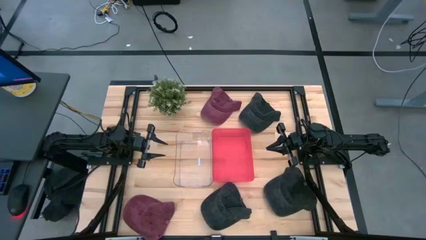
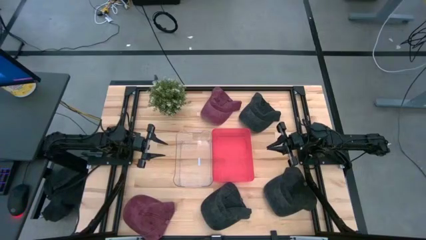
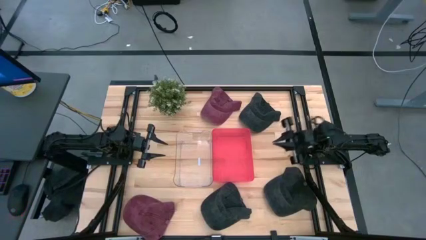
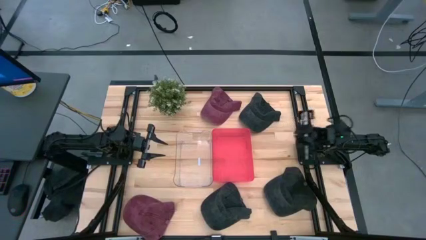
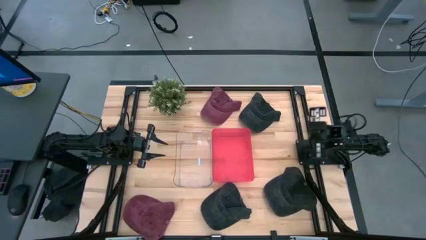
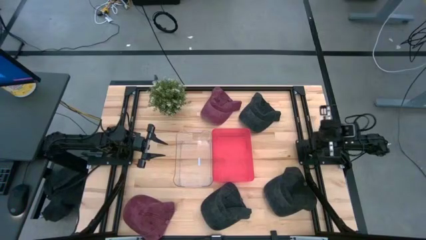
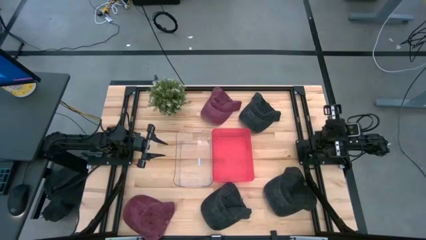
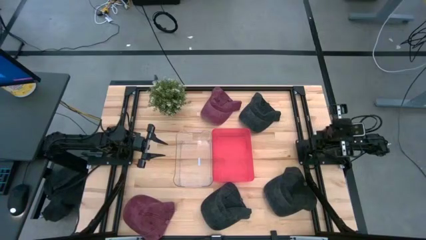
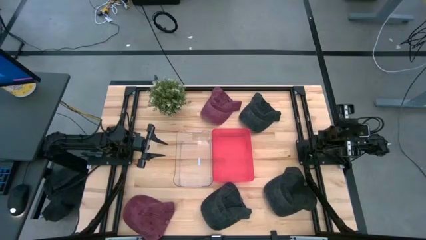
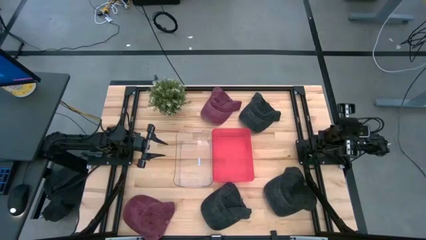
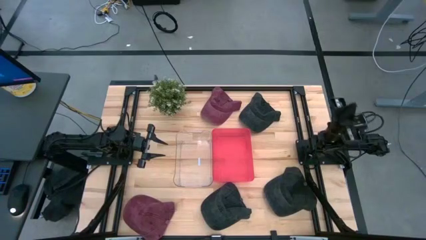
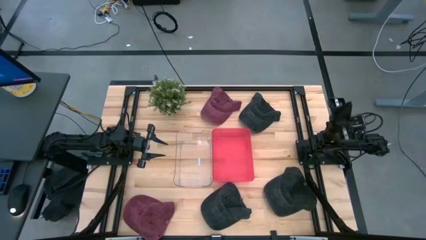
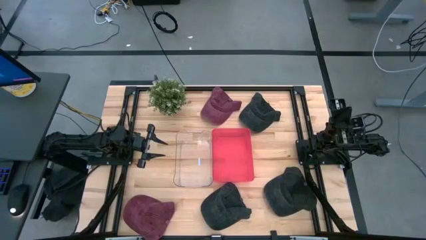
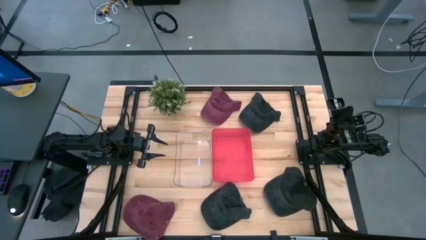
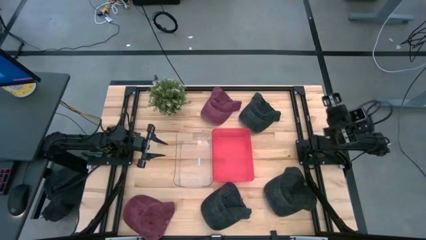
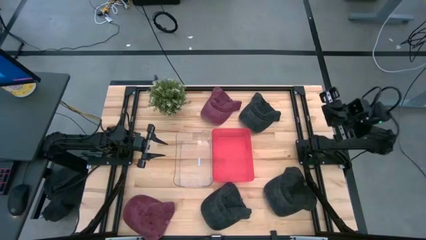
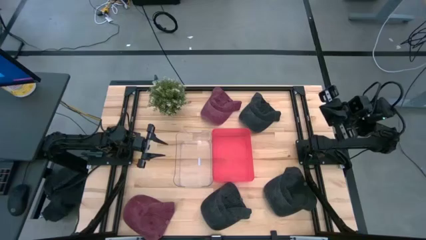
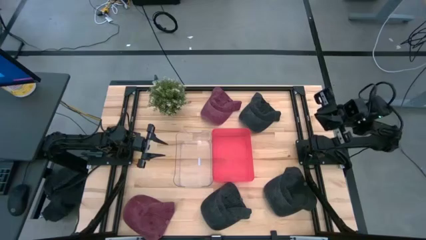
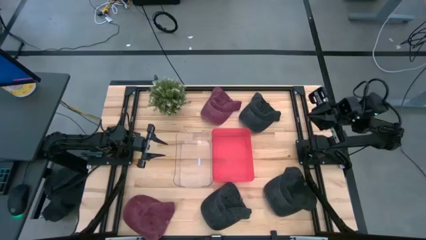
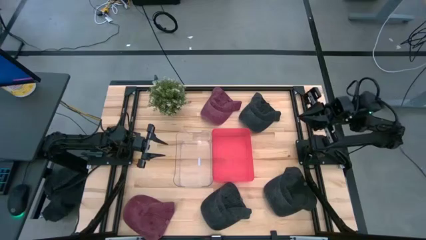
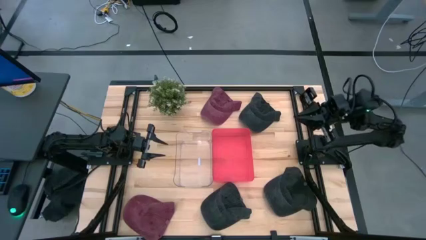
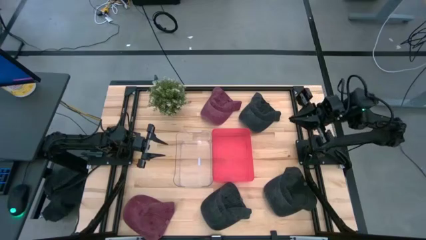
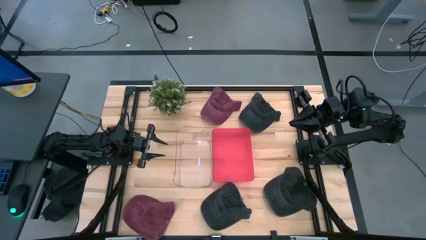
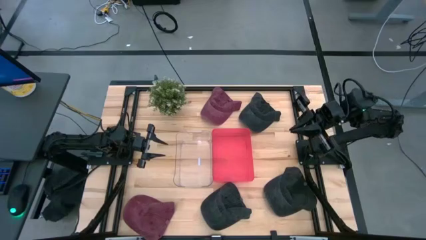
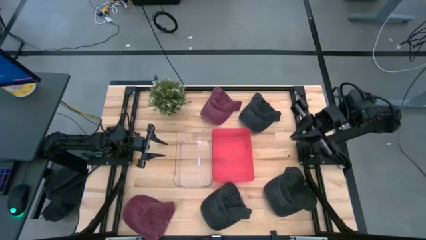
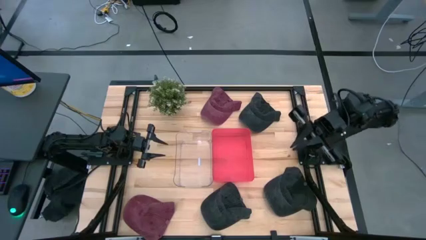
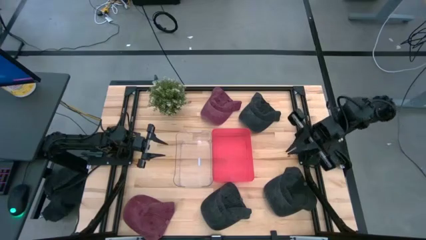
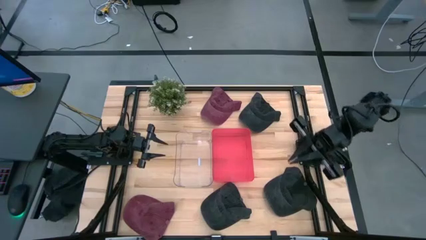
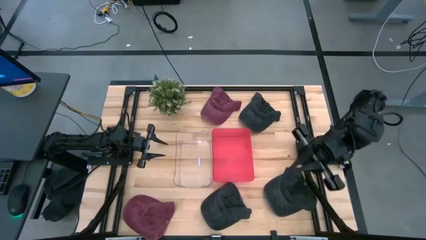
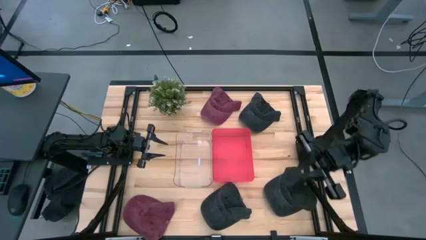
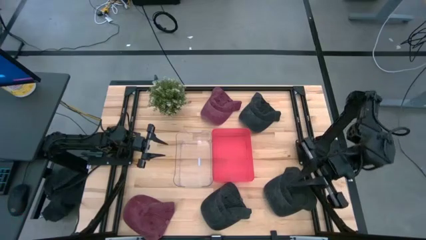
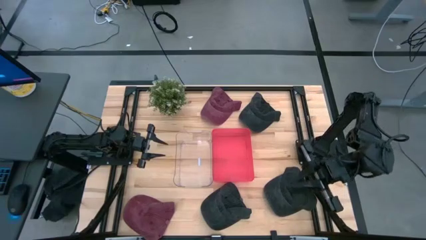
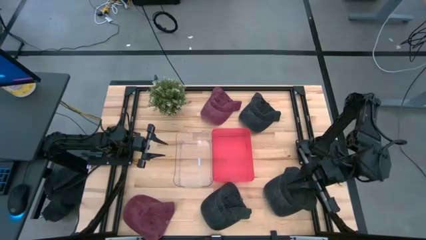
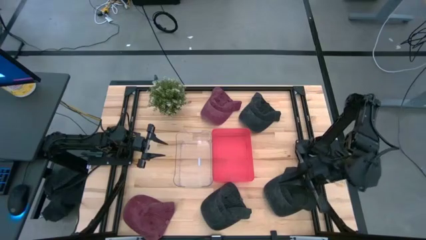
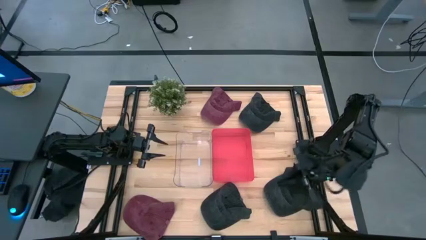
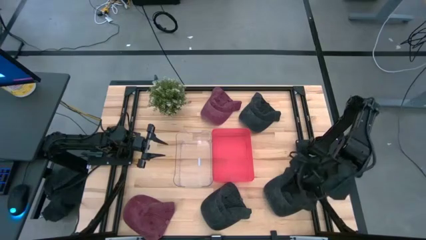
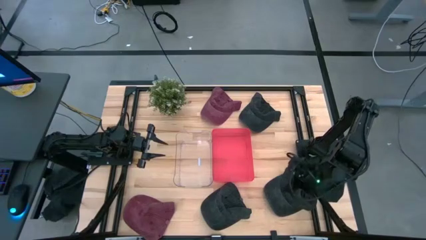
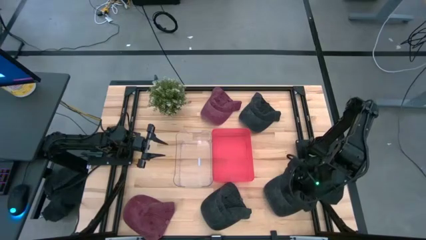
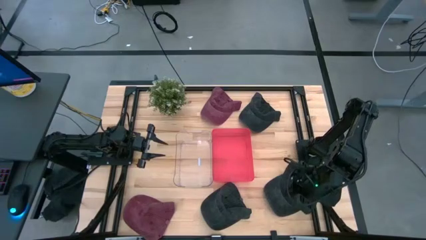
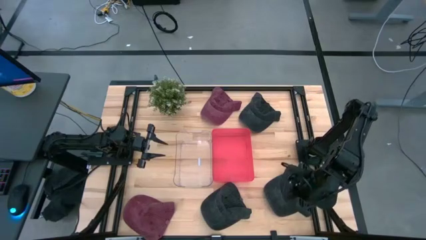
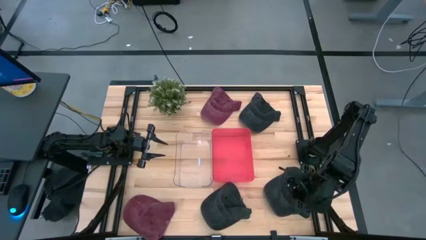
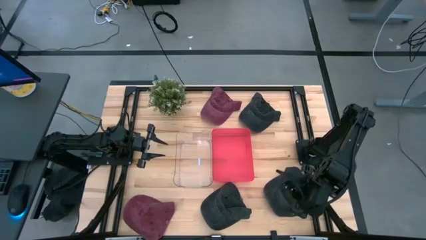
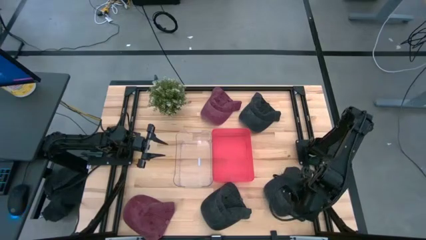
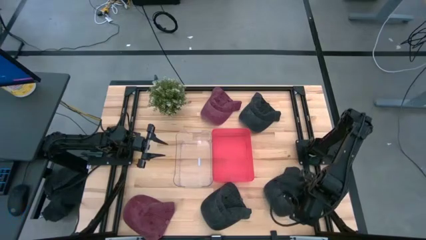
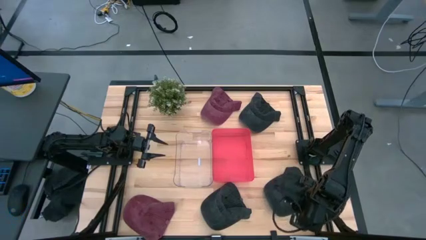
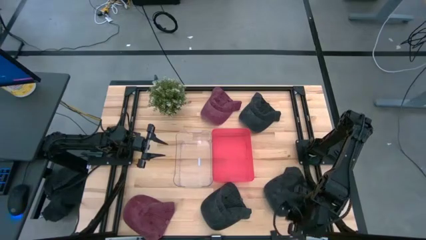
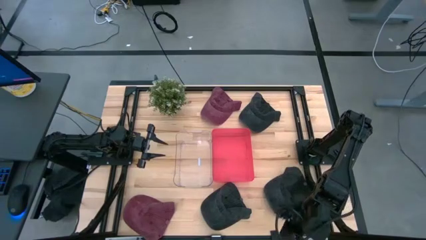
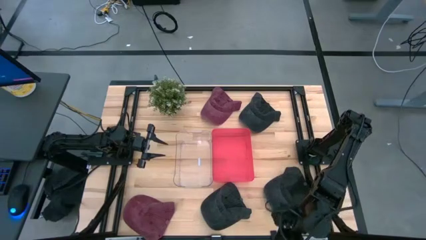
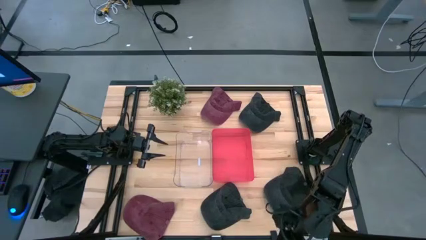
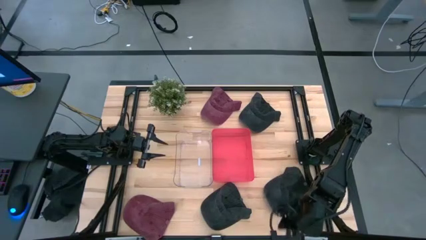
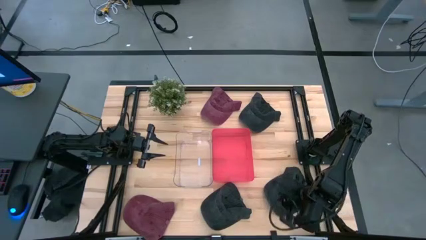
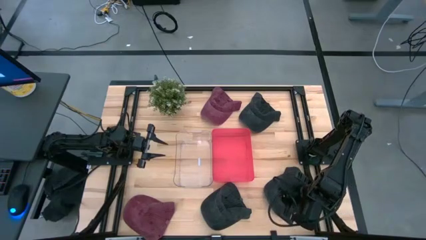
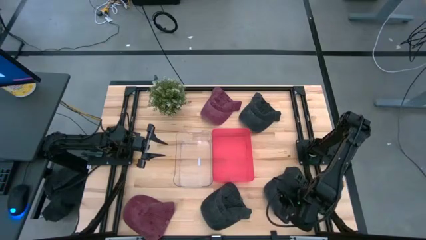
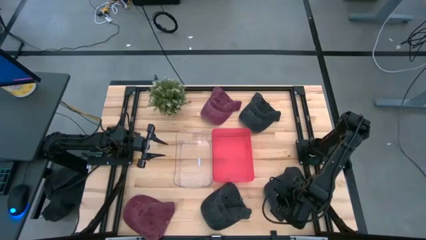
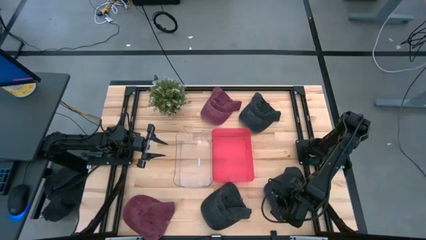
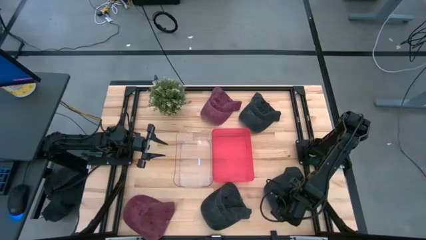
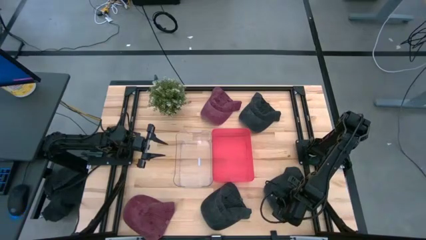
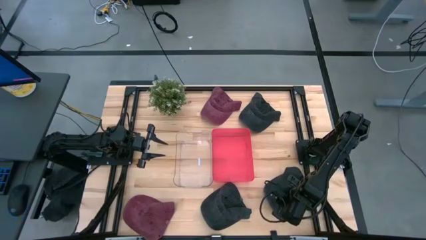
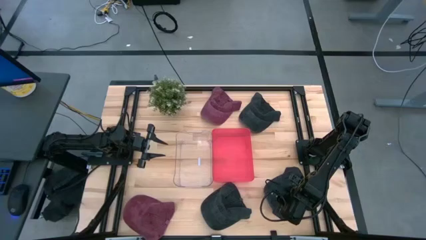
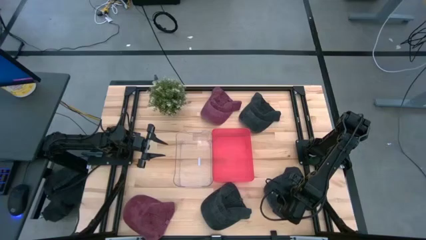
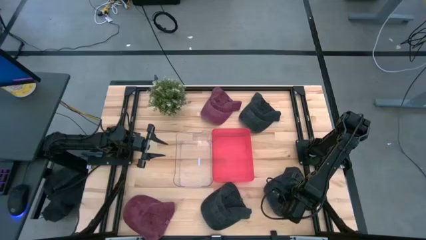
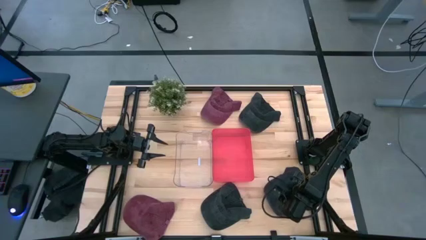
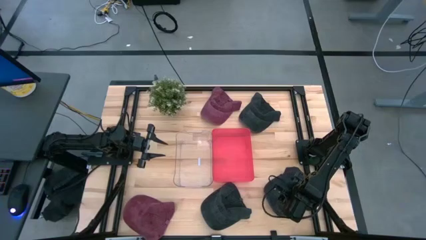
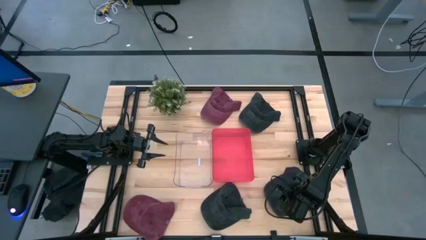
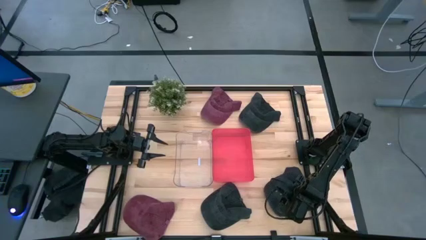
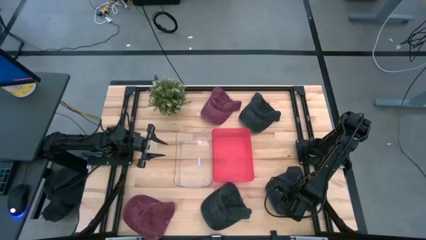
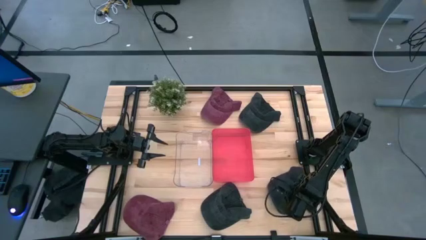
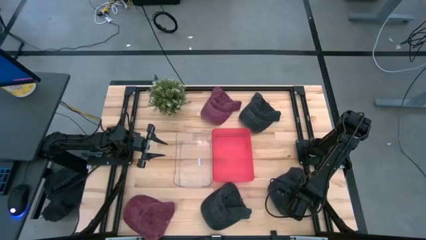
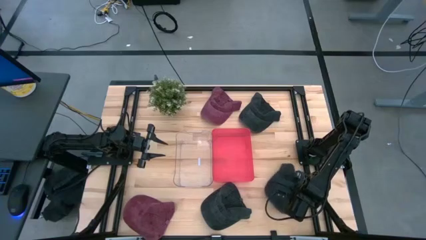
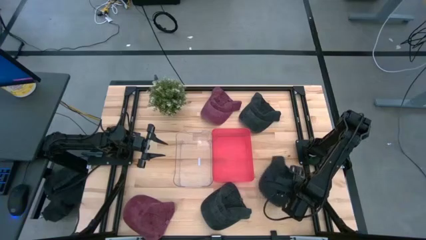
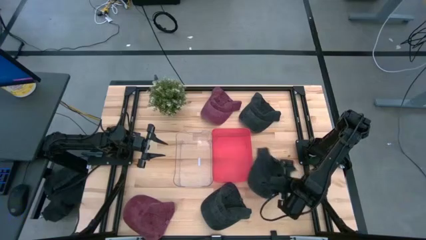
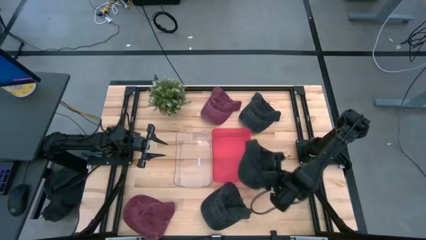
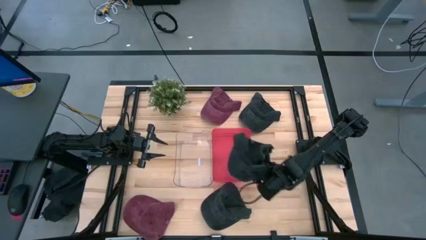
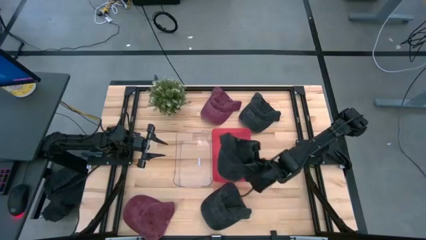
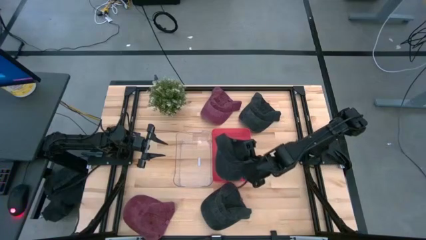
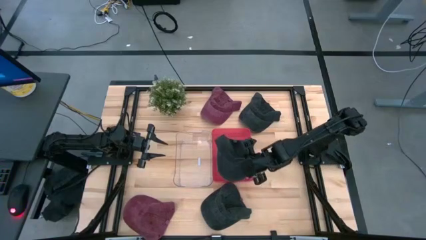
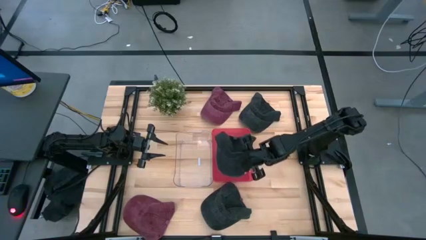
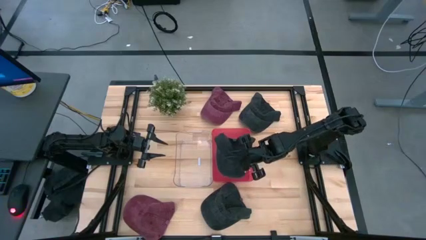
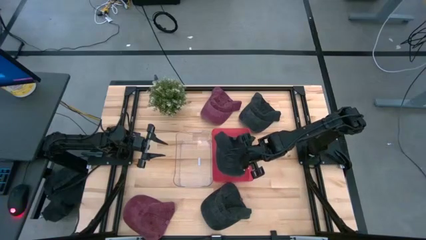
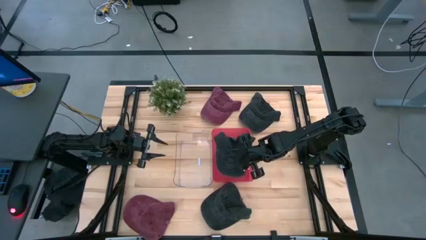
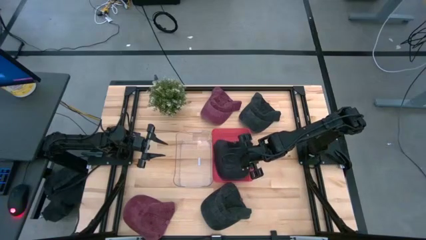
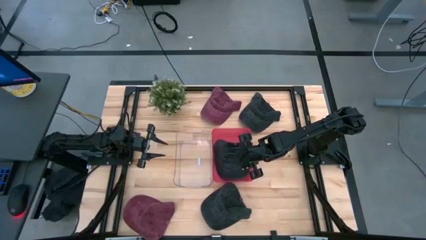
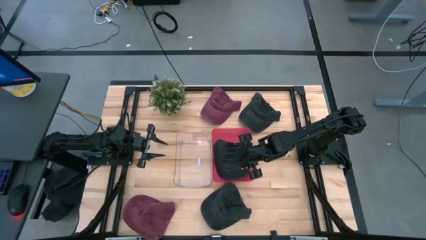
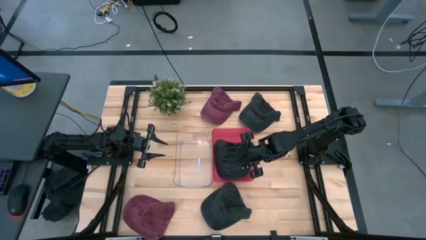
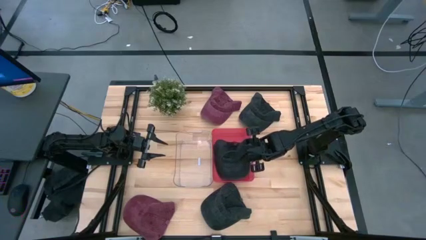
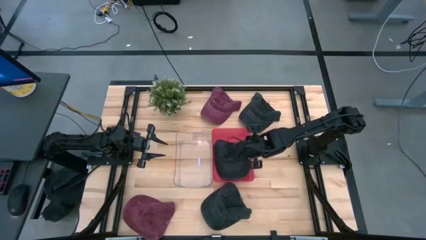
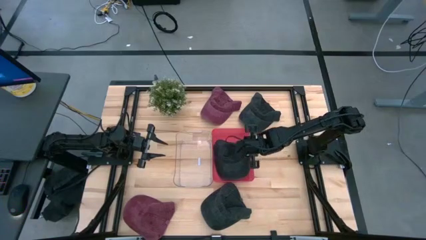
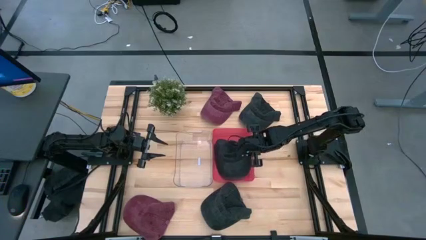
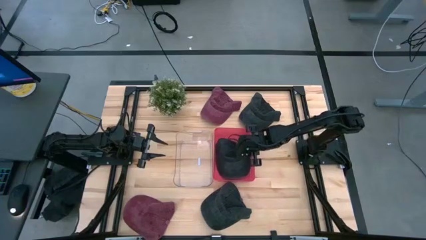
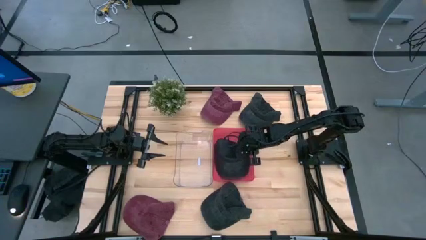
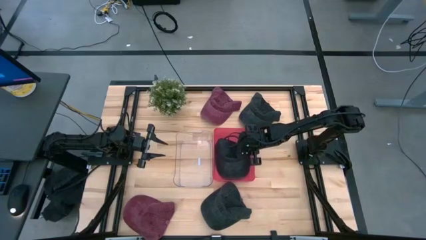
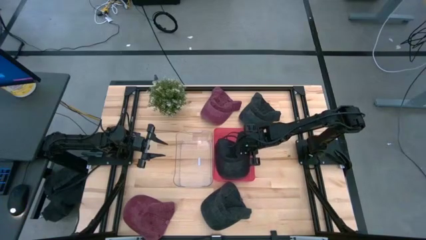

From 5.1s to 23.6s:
Task: Pick & Place hat
Put the bottom right black cap in the red bin
